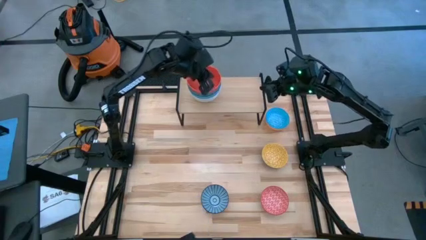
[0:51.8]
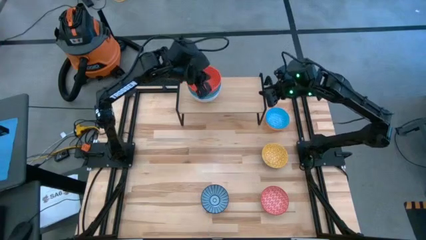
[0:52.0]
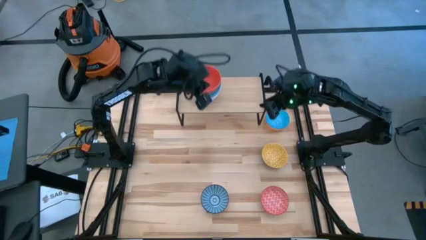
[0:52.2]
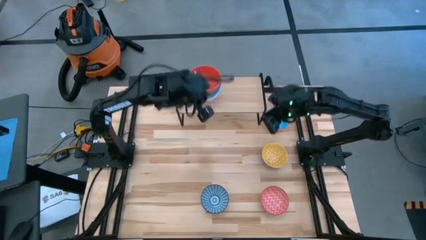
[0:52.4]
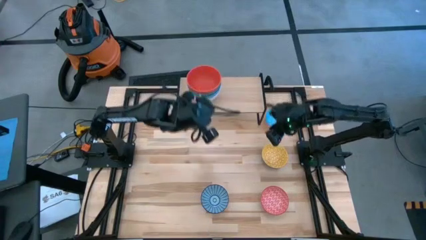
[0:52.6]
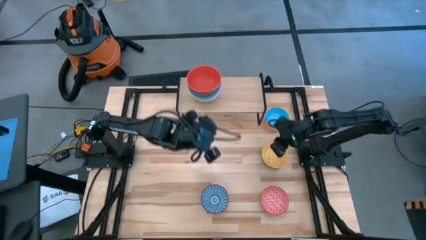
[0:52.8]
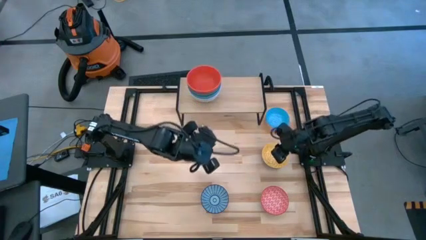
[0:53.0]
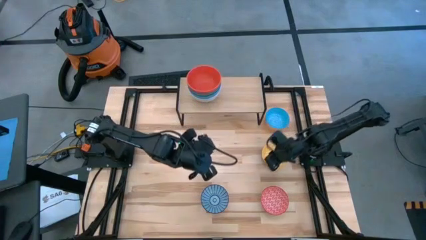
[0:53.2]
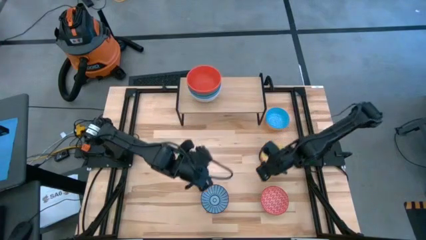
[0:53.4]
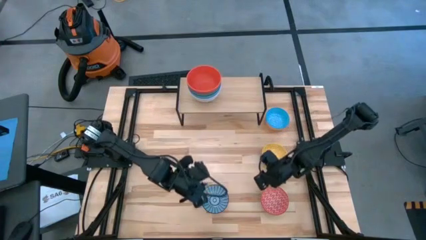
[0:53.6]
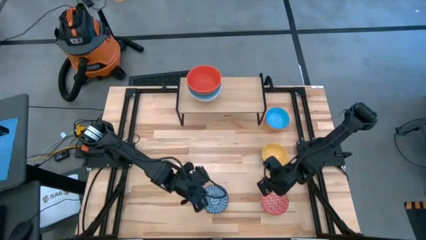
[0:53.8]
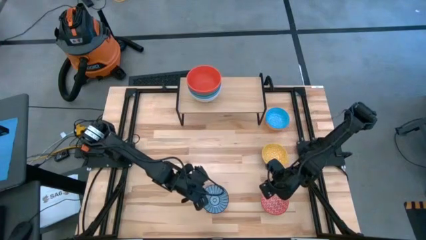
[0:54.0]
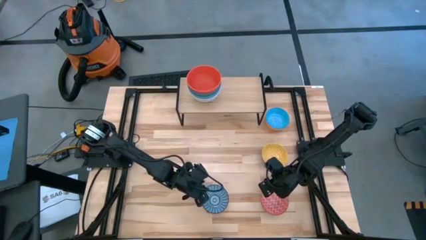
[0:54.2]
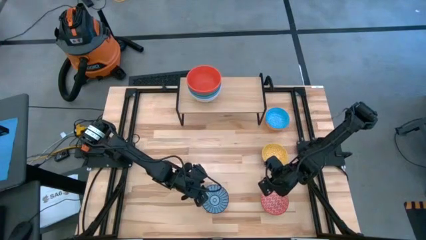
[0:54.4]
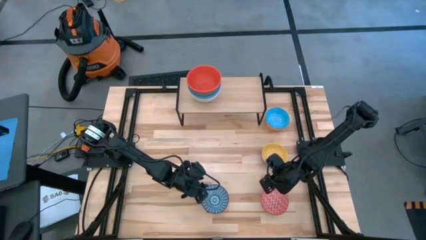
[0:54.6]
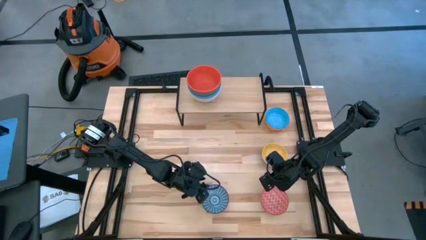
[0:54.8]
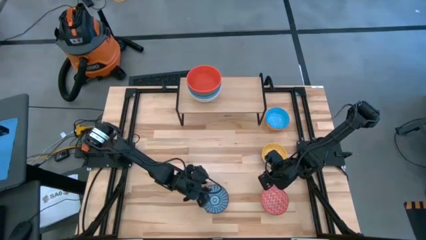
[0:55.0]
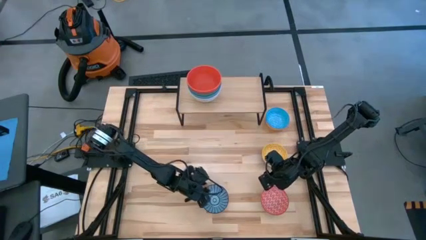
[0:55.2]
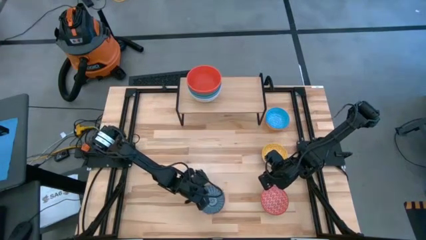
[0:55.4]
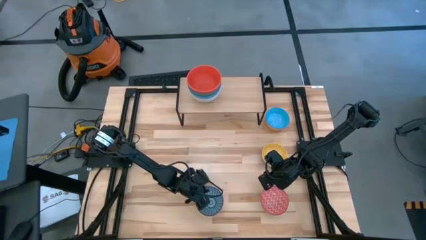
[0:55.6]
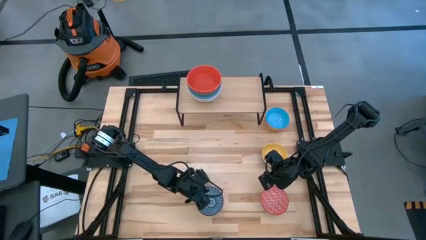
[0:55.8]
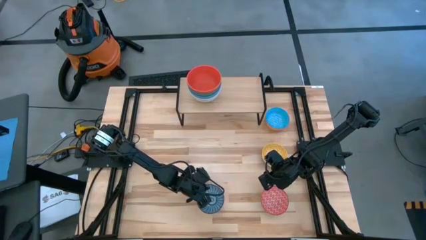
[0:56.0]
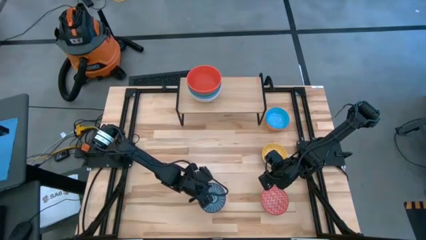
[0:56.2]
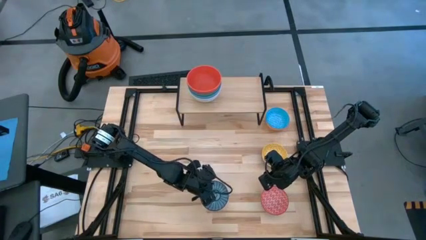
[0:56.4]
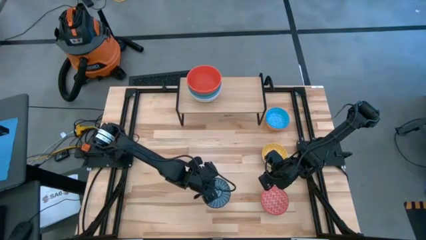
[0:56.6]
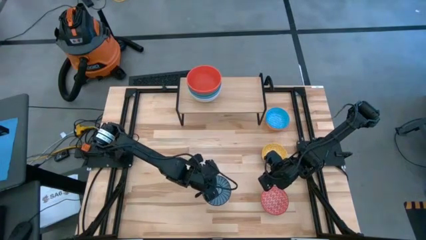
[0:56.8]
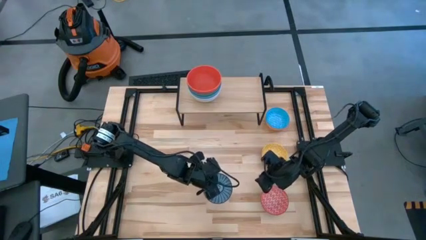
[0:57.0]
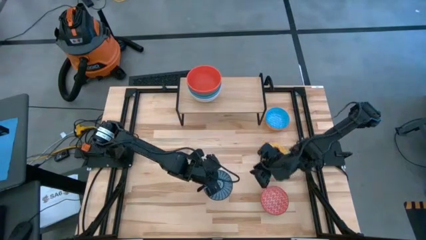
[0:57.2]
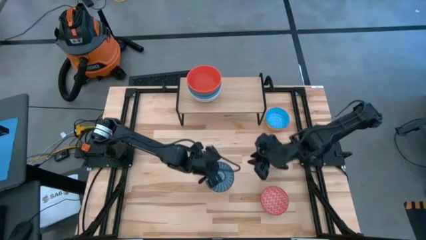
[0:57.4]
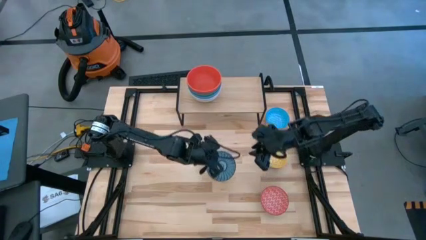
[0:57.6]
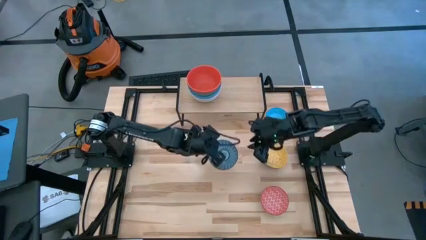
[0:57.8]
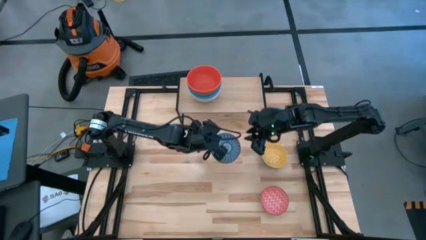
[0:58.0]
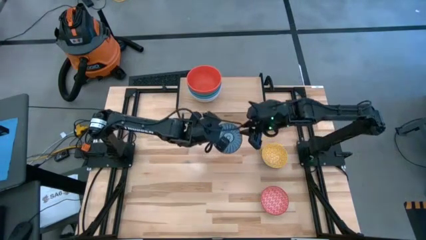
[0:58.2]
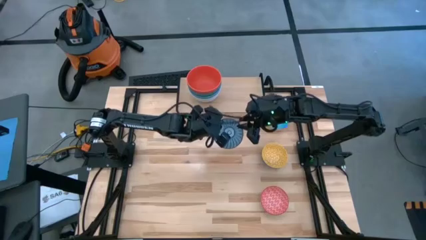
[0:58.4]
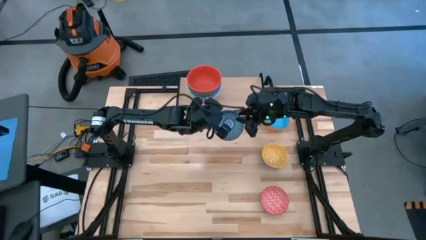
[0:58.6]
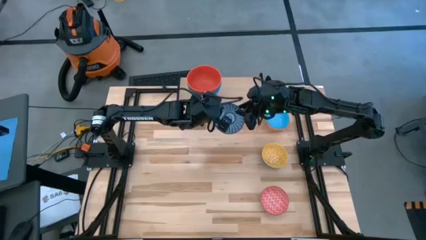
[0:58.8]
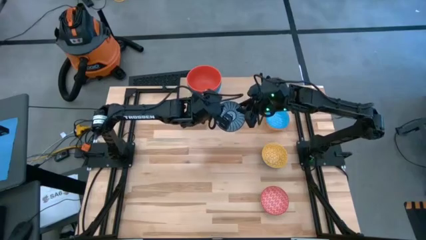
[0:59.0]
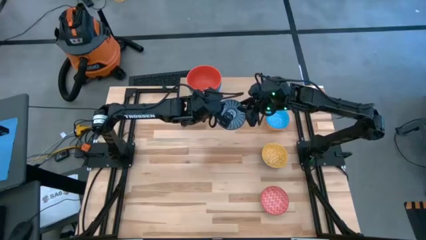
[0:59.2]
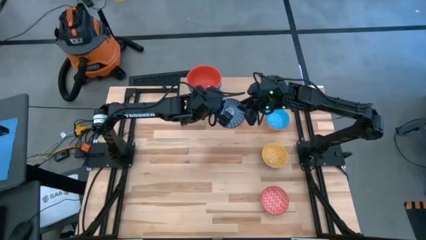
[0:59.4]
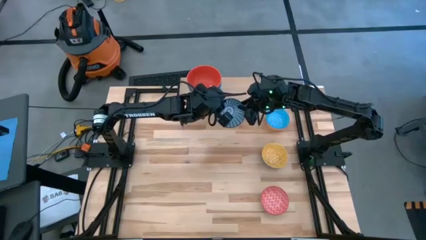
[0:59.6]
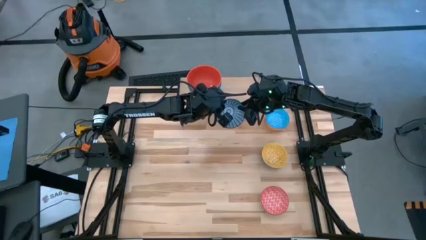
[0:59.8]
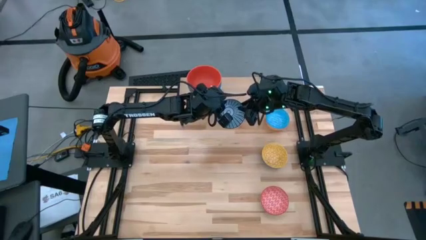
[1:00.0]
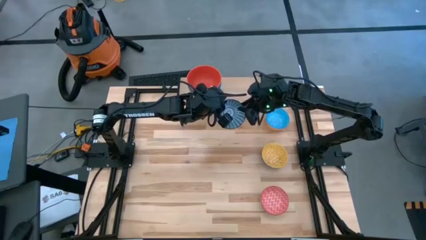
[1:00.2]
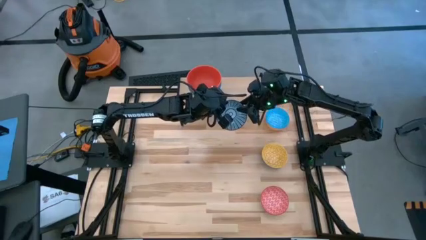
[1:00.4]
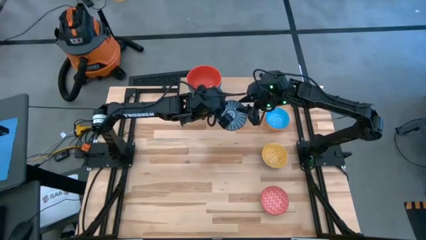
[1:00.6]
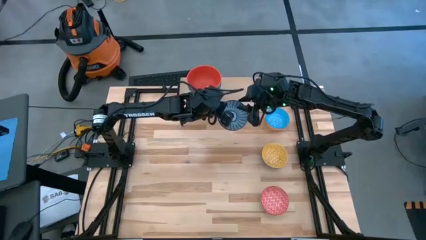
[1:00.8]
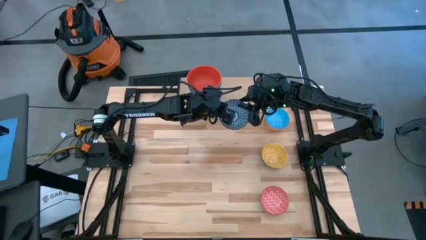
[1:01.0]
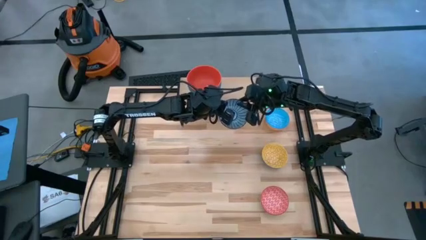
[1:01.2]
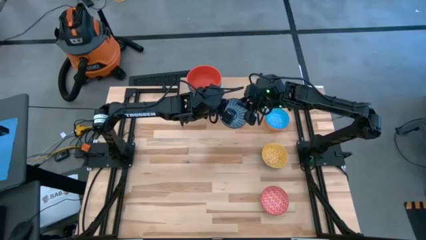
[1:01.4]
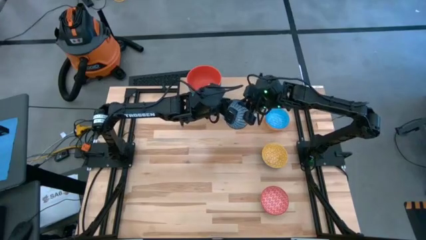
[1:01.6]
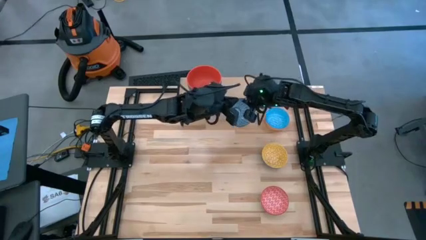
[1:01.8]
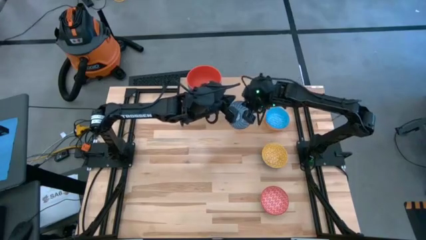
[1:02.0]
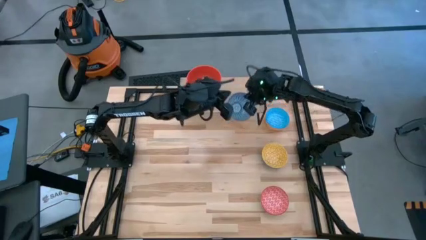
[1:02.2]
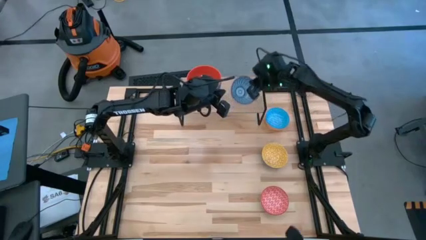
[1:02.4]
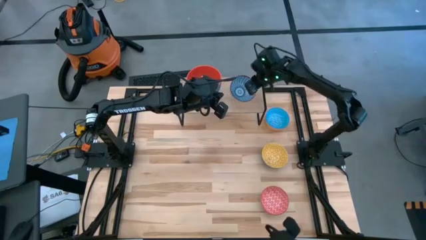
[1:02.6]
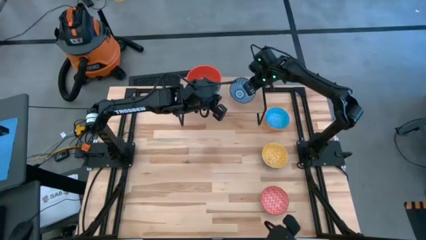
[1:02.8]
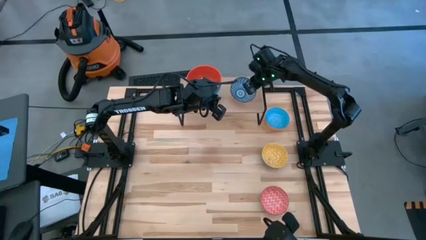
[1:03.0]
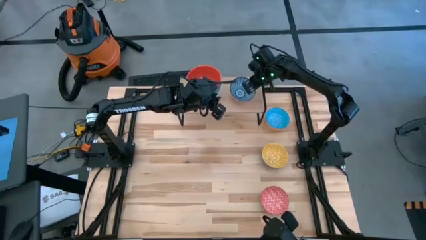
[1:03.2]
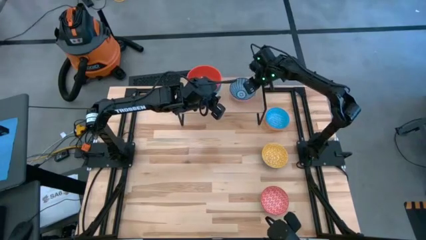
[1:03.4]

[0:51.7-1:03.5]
Task: Place and stack bowls onto a shelf
Put the blue patterned bowl on the shelf

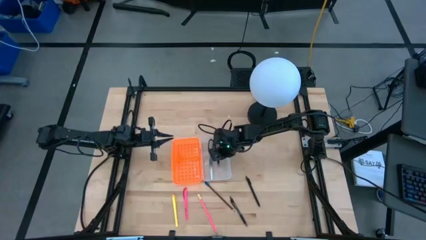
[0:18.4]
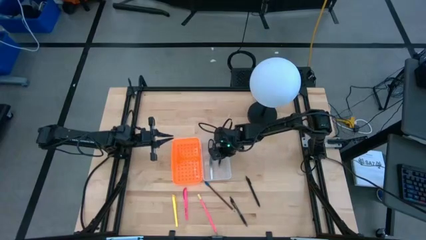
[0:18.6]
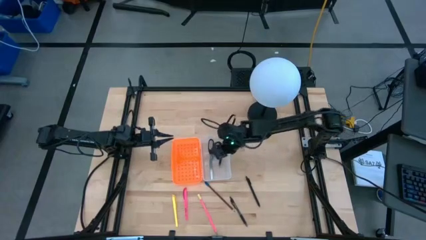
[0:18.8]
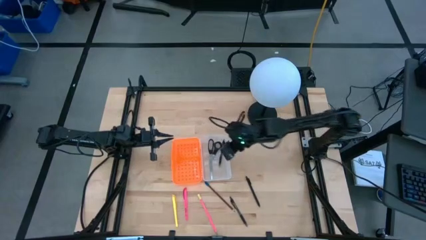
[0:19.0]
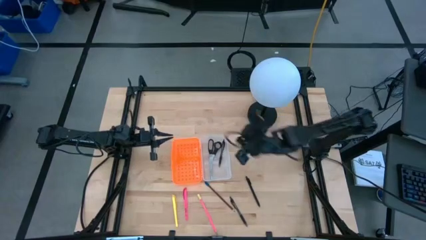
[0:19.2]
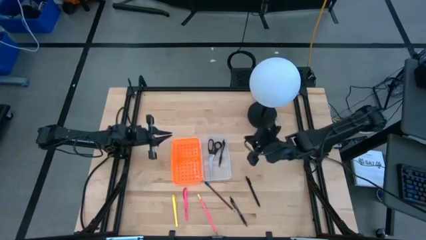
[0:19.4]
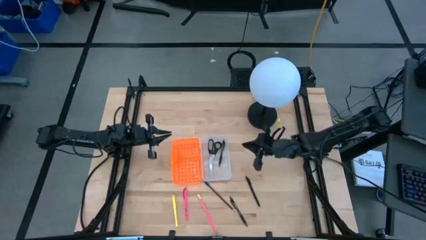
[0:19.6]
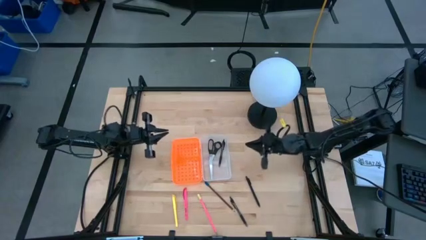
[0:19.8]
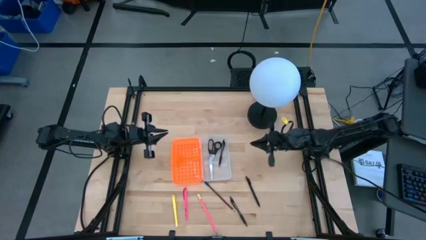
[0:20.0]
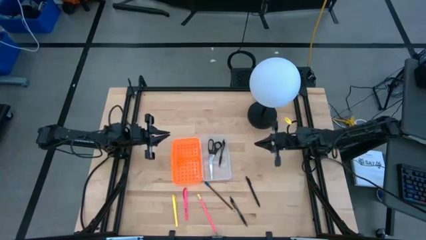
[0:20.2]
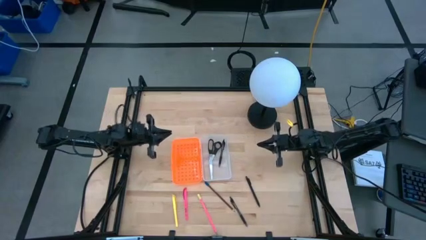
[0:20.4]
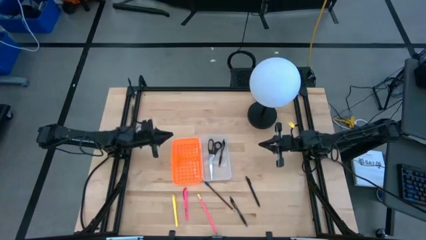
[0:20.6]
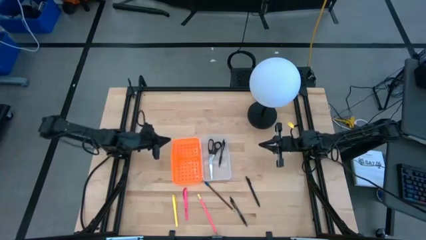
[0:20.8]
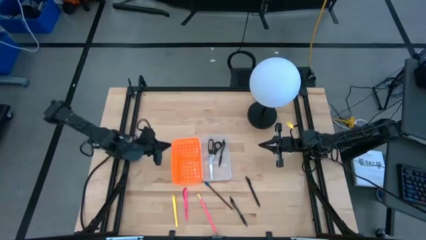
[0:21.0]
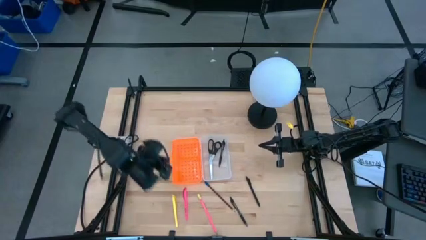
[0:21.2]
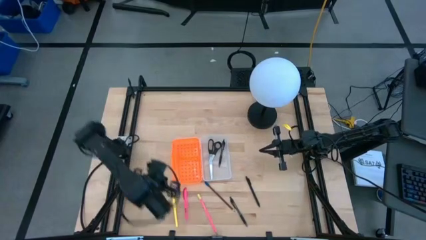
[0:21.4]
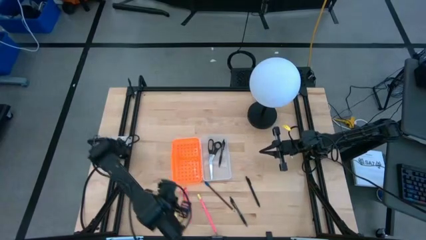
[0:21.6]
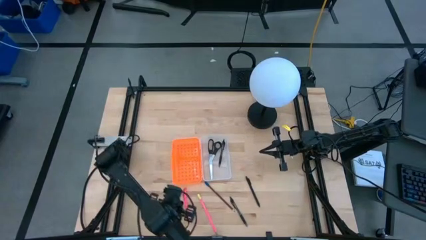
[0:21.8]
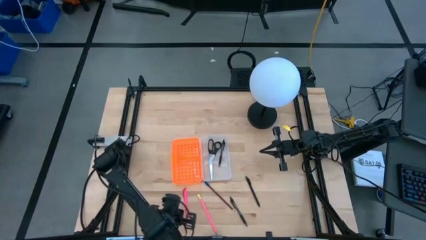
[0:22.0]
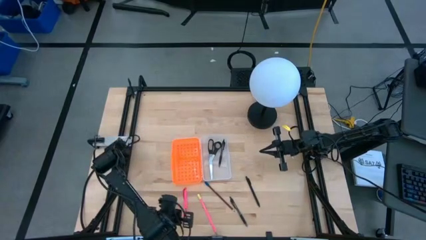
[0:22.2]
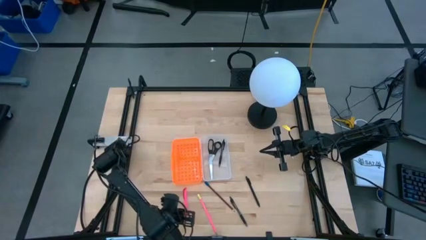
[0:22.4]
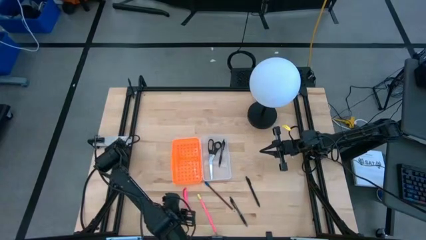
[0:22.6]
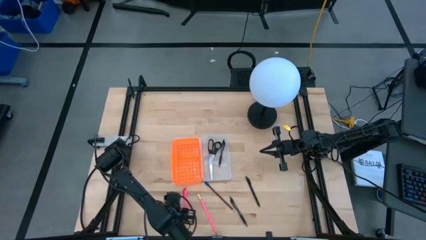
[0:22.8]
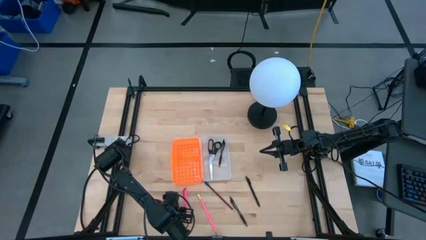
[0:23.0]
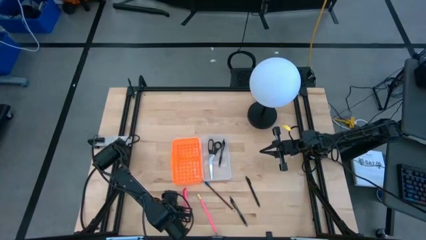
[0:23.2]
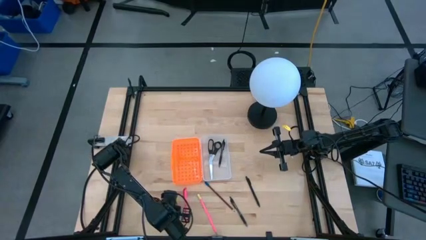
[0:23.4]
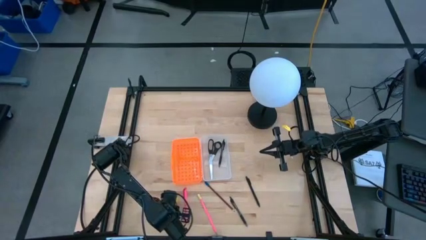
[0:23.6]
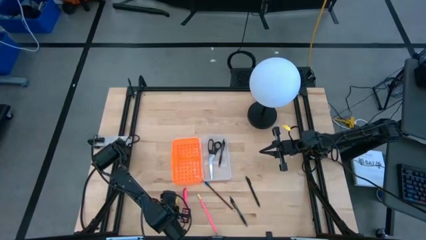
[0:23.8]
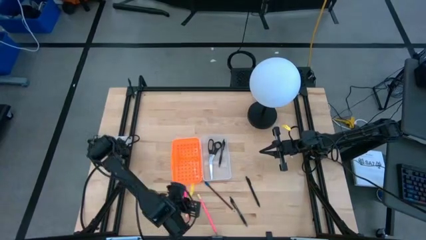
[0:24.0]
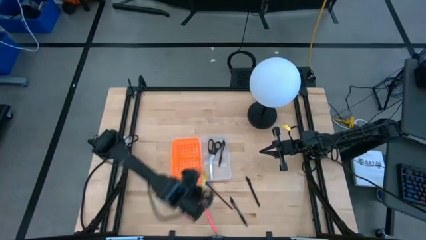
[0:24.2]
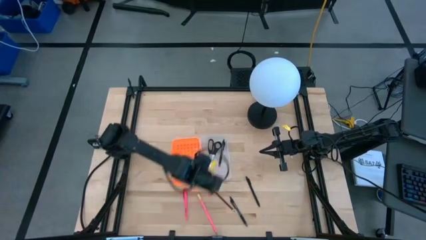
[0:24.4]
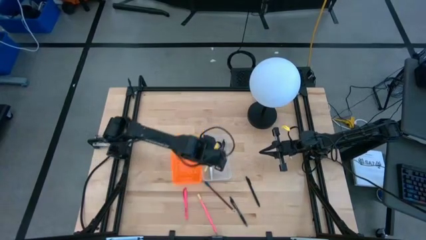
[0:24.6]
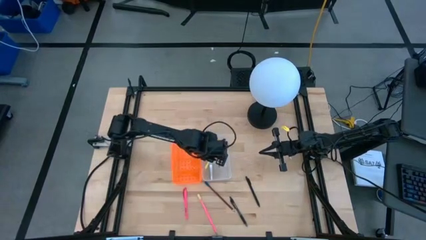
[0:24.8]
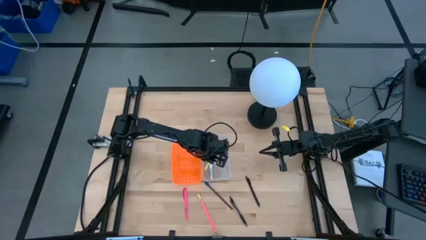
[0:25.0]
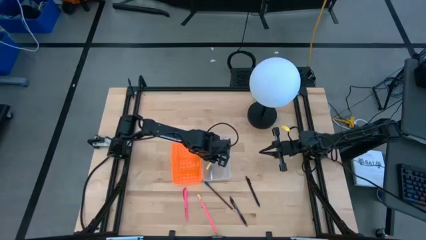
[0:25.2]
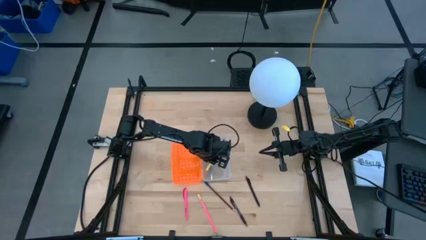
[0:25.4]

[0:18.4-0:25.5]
Task: Pick & place school supplies into a supply box
Put the yellow pen into the supply box
